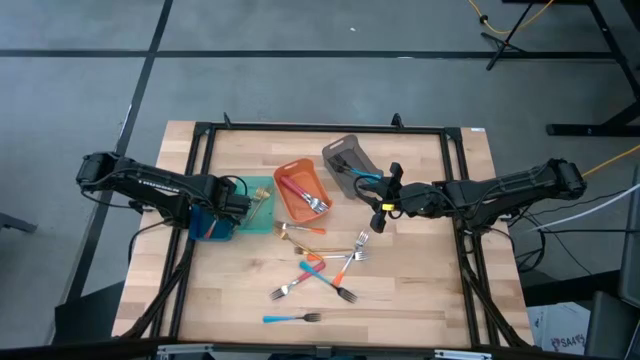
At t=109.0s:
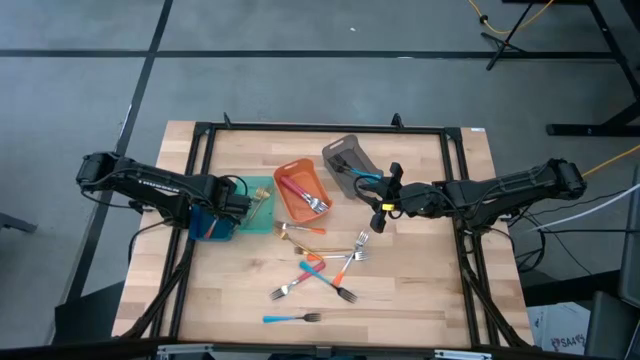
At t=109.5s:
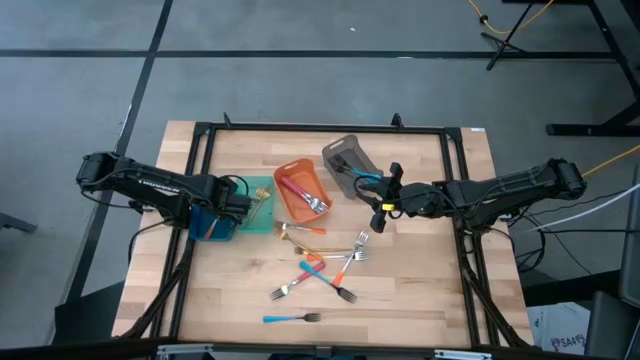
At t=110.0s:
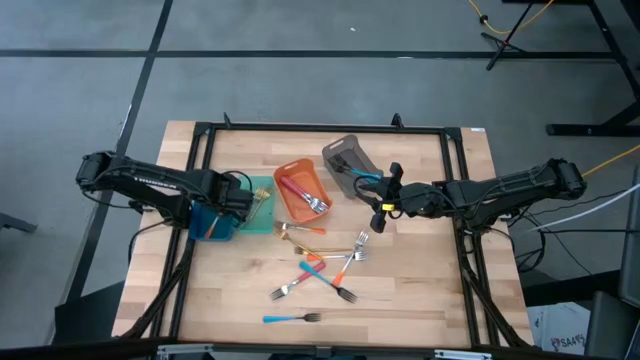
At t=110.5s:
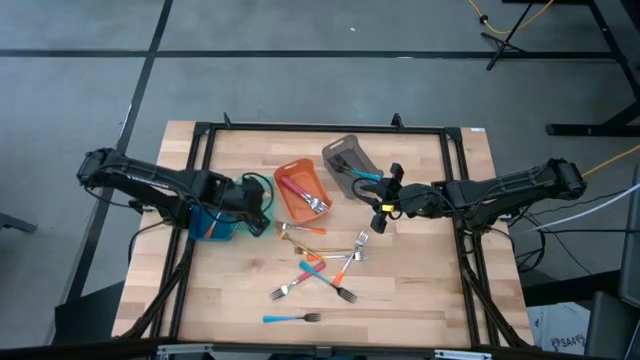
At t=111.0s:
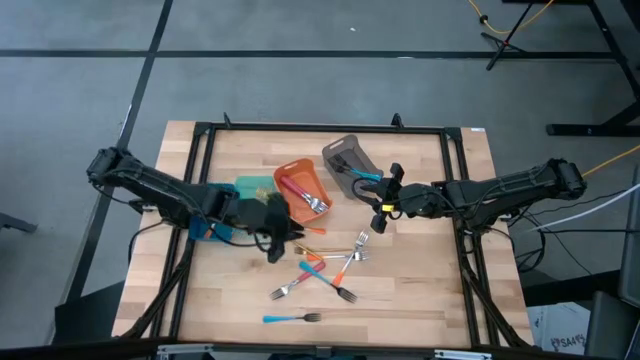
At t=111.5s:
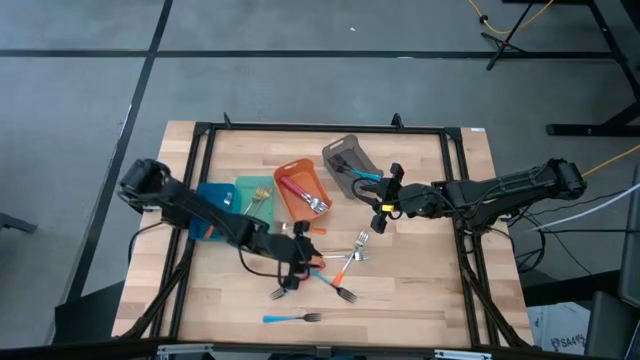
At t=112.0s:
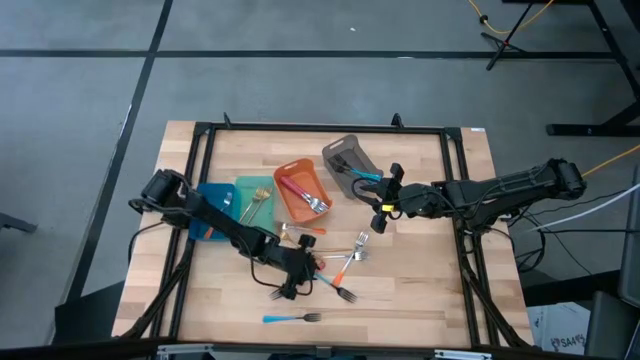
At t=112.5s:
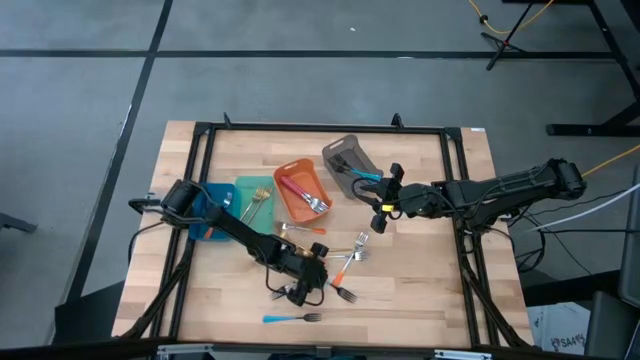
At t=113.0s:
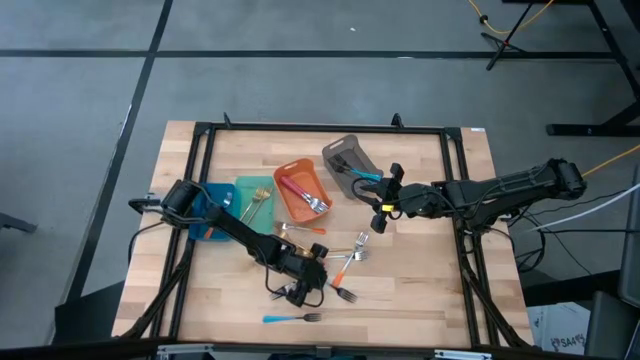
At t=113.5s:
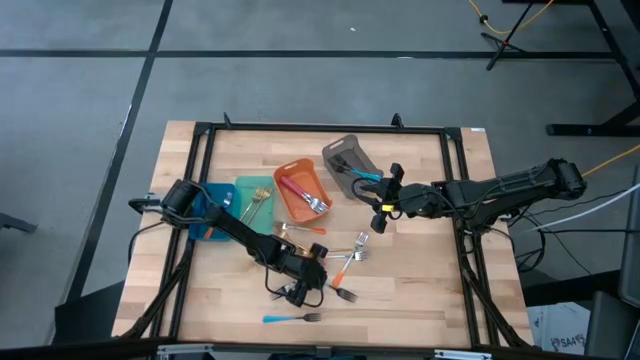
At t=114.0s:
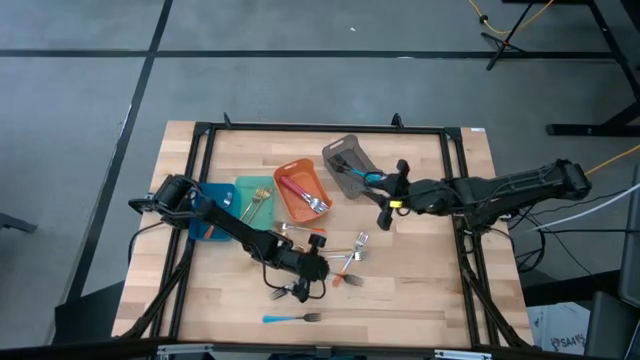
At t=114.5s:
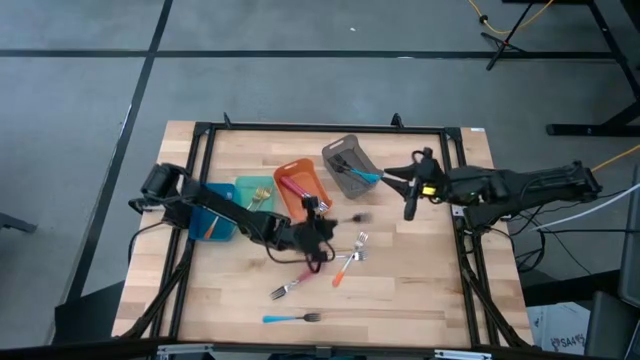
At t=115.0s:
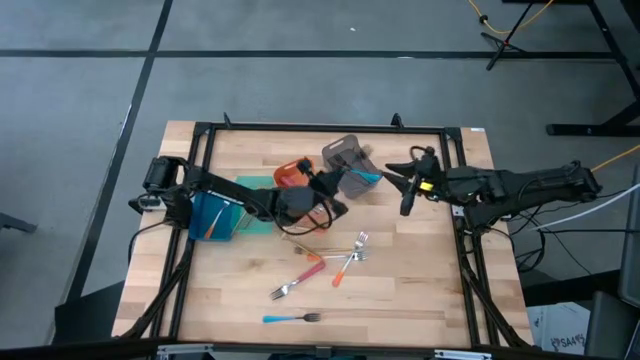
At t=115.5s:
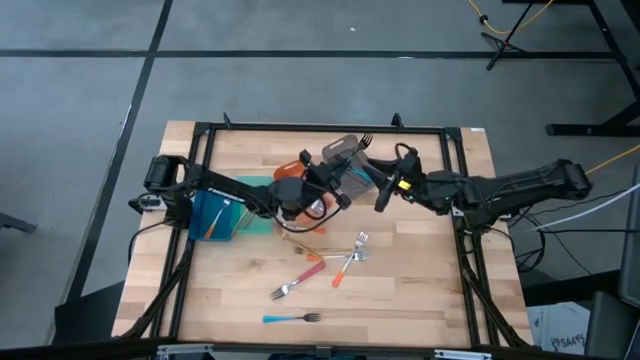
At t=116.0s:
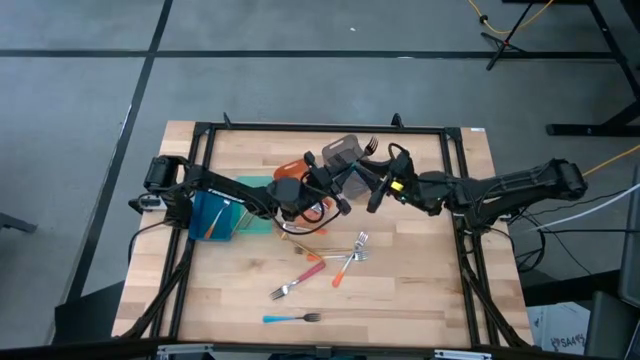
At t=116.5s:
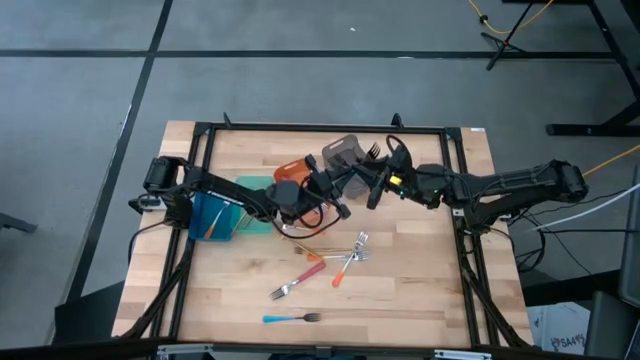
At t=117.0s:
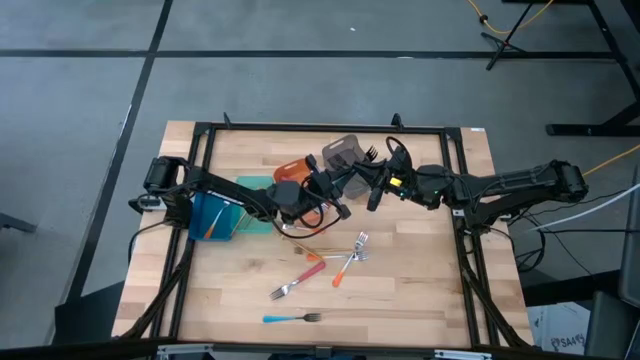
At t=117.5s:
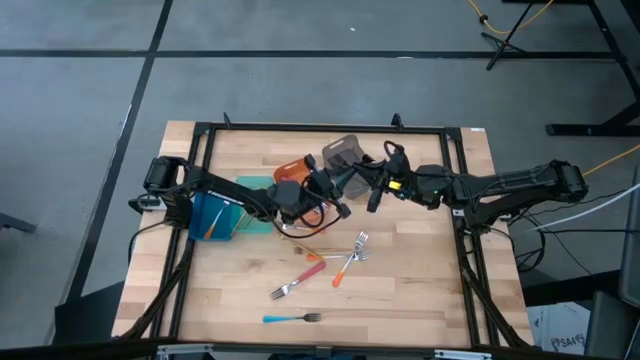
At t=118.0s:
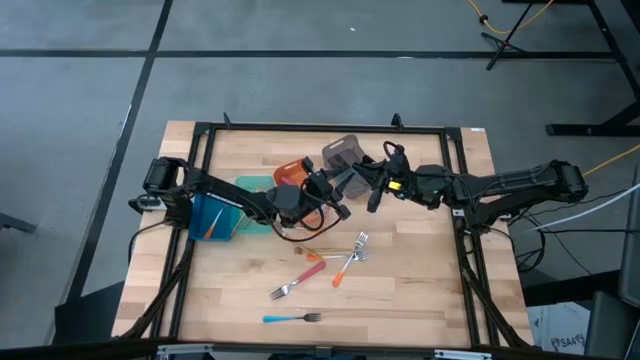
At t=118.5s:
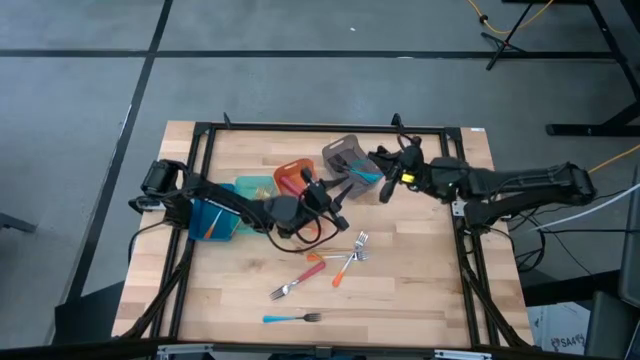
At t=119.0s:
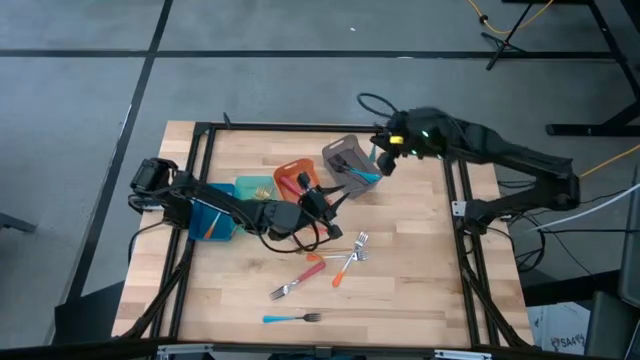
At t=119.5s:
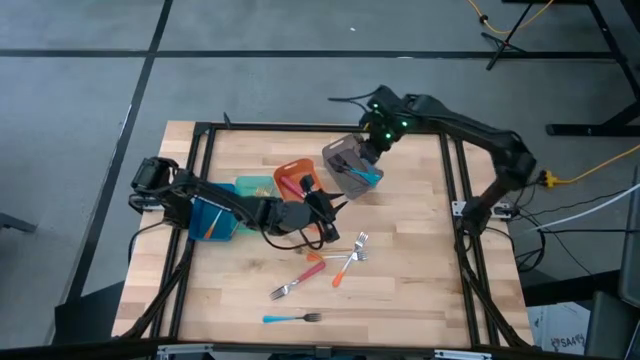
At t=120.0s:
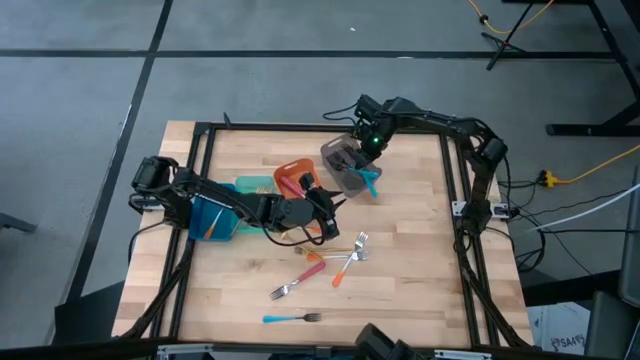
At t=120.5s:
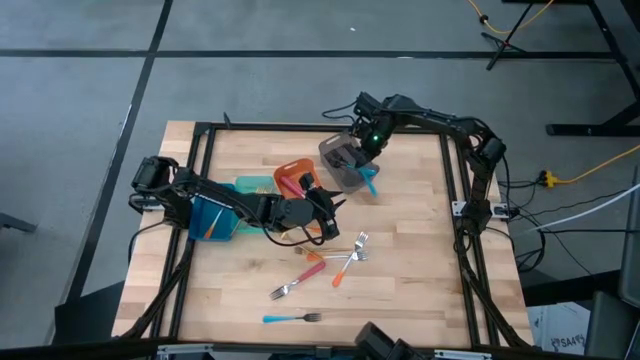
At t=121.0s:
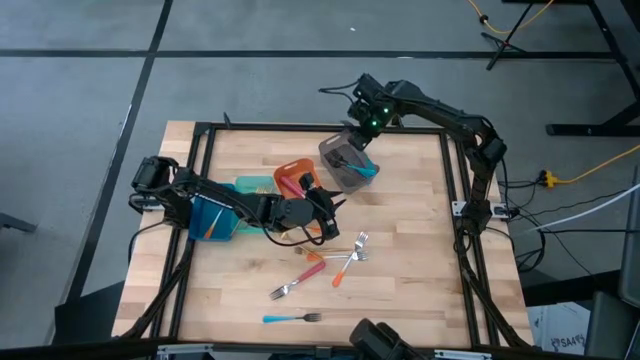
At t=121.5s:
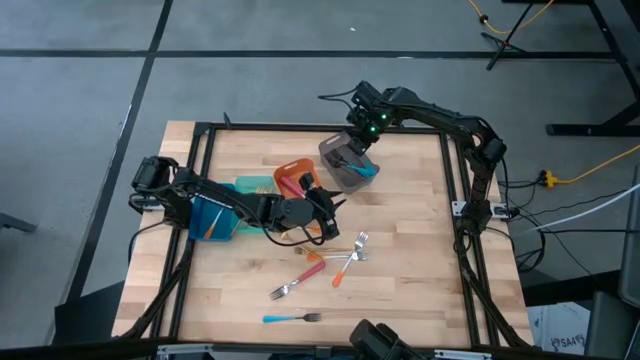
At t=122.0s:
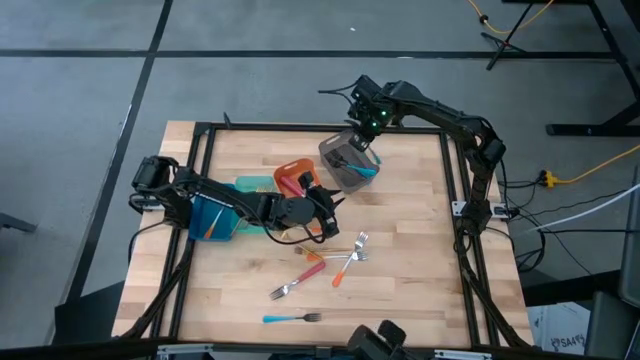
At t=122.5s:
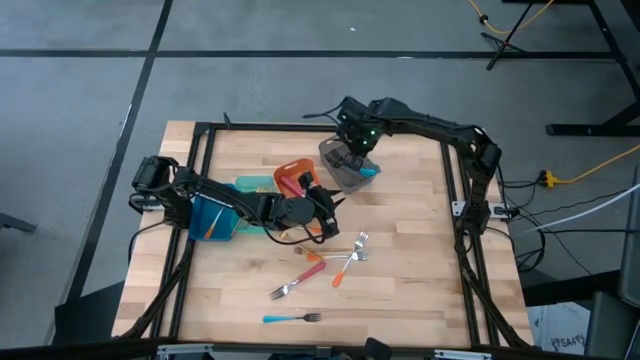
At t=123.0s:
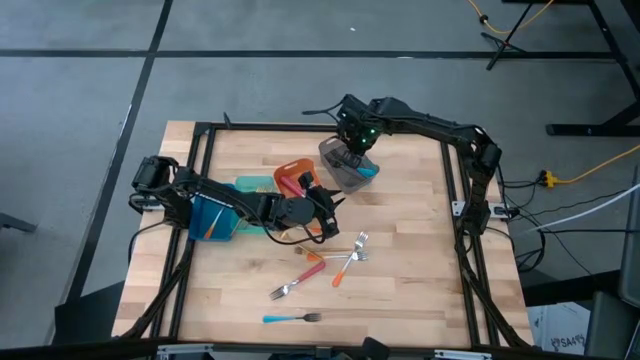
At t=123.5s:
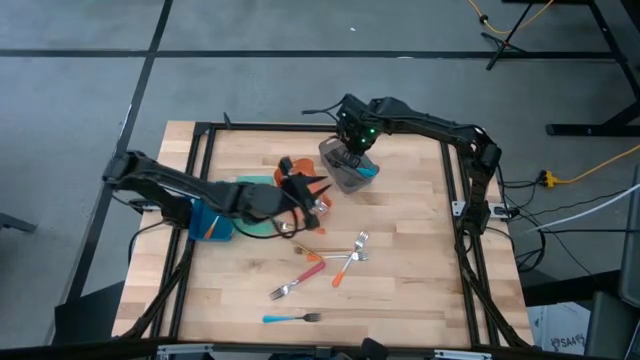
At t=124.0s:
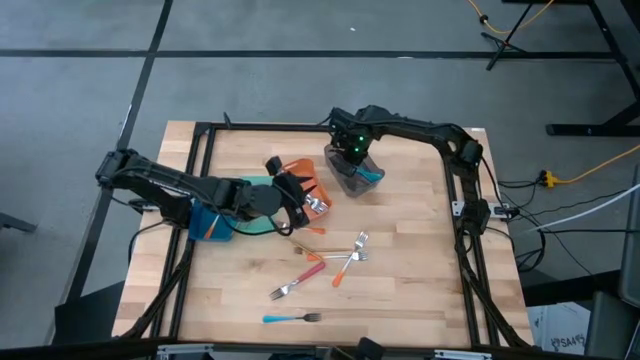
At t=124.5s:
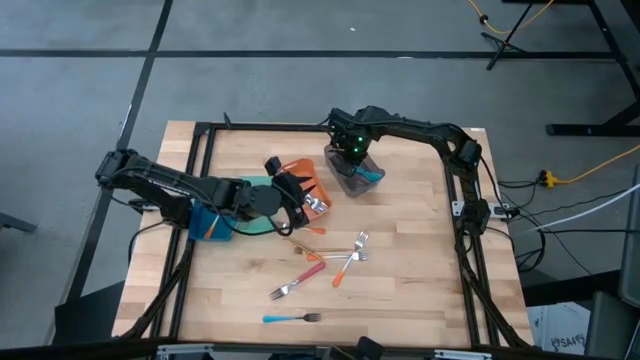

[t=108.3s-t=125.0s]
Task: Sort silverware by color (type)
Put the blue fork into the black bin

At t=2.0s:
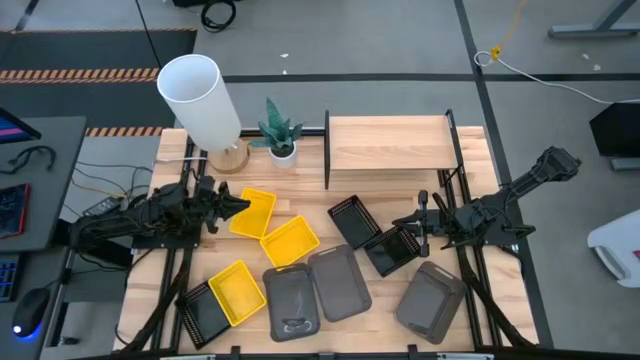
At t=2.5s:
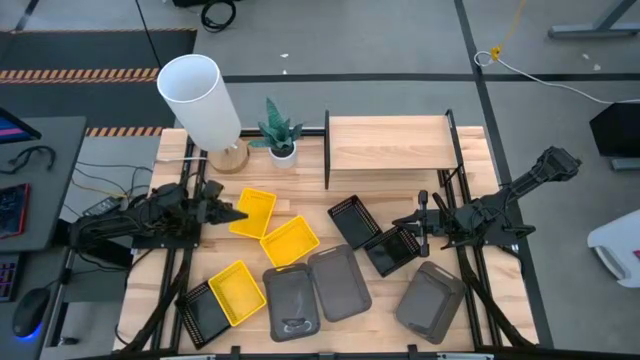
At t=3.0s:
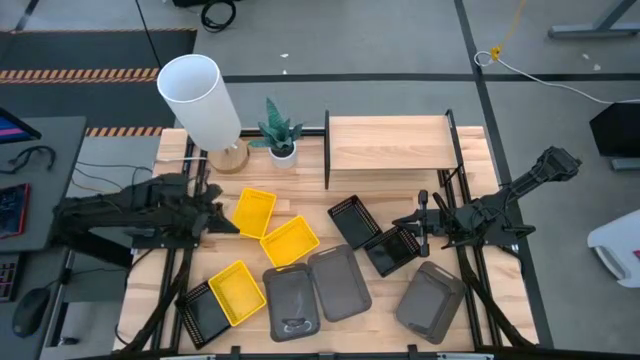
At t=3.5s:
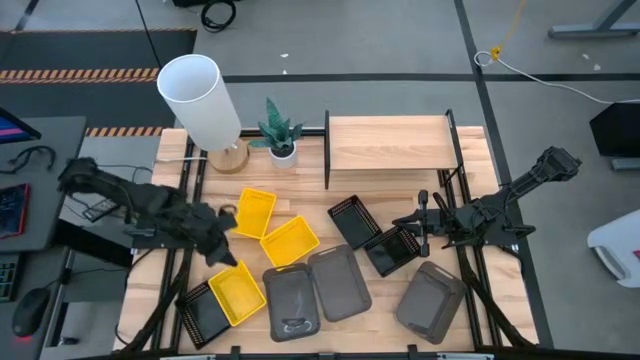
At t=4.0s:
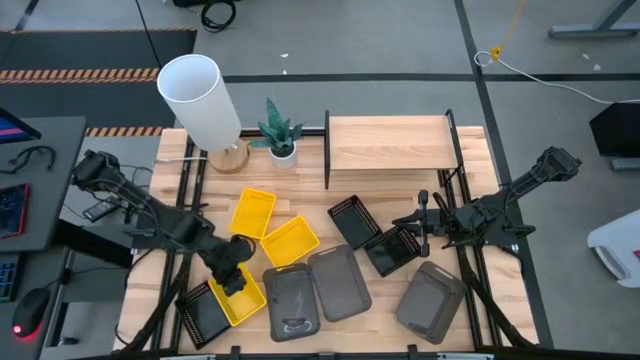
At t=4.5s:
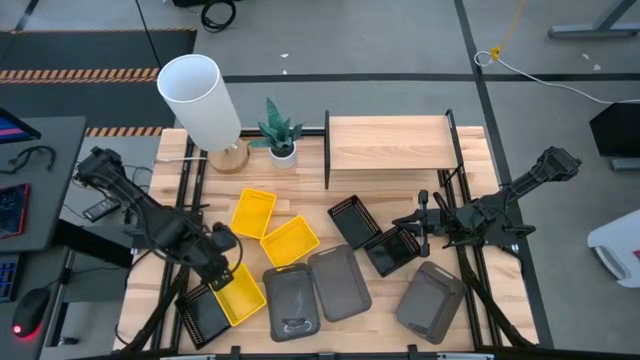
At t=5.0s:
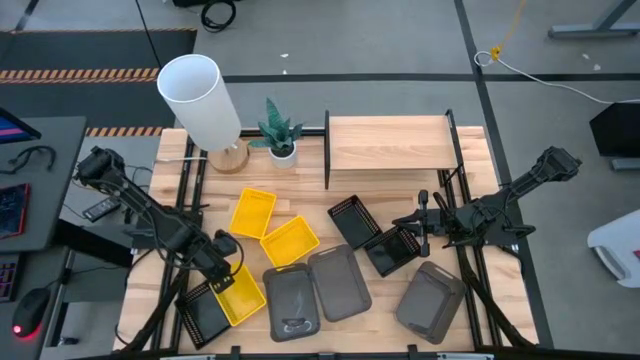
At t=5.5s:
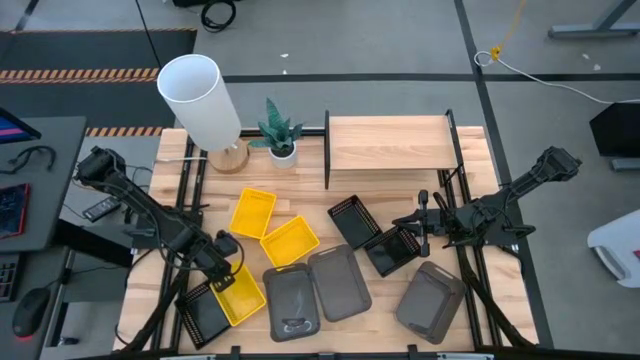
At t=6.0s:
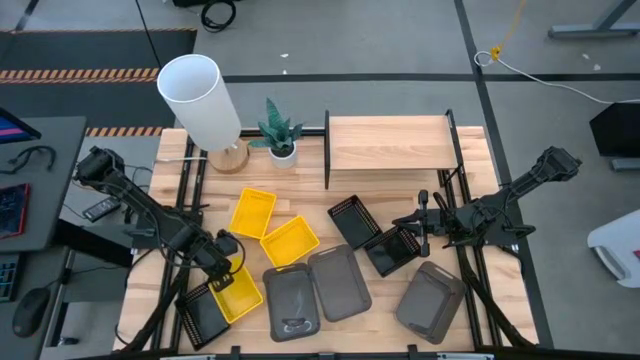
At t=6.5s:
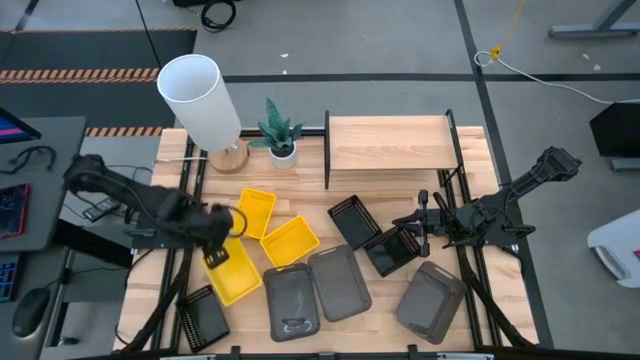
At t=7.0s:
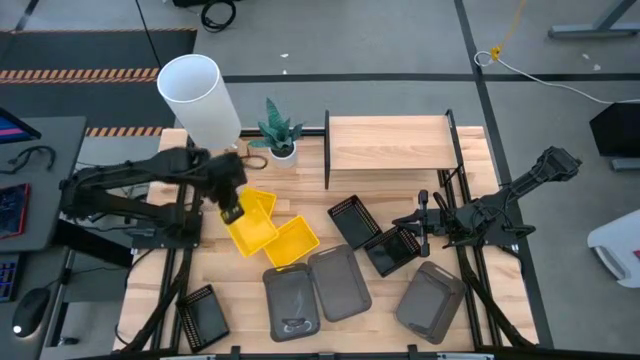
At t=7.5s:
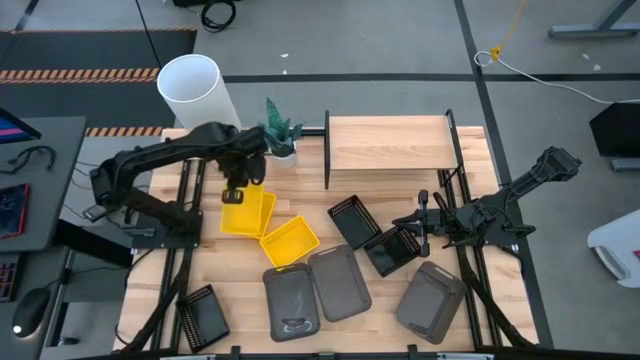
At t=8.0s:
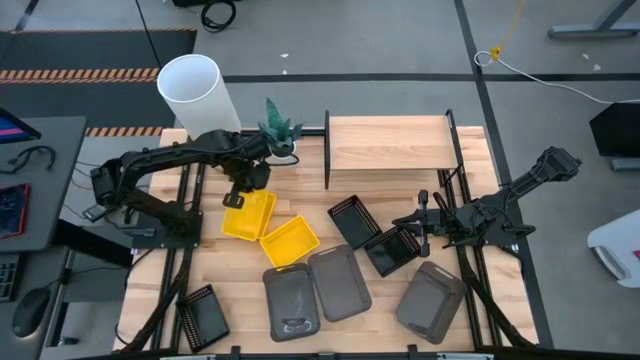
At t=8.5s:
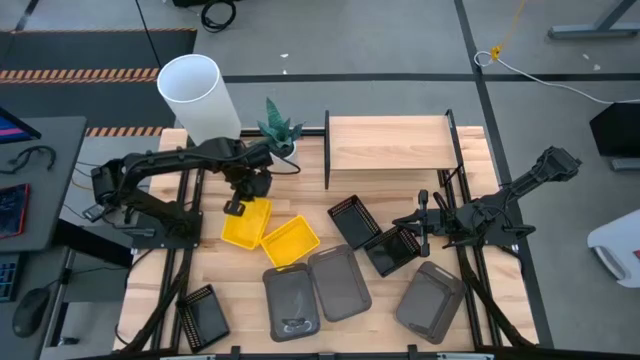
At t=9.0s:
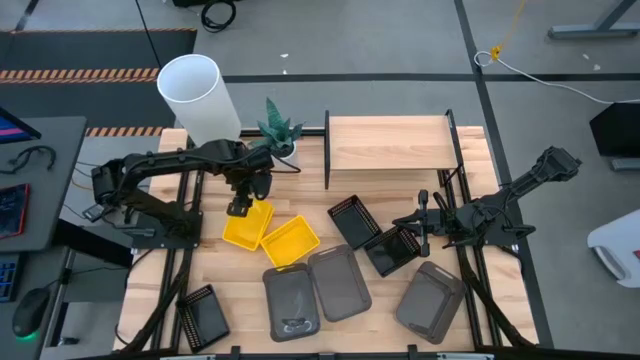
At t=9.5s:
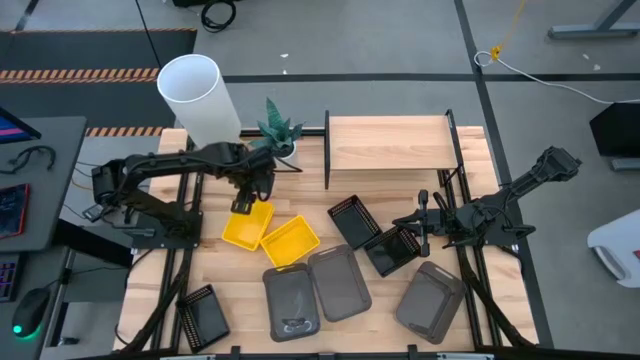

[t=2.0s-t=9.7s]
Task: Stack baskets on shelf by color
Stack the bottom yellow bin on top of the top left yellow bin
